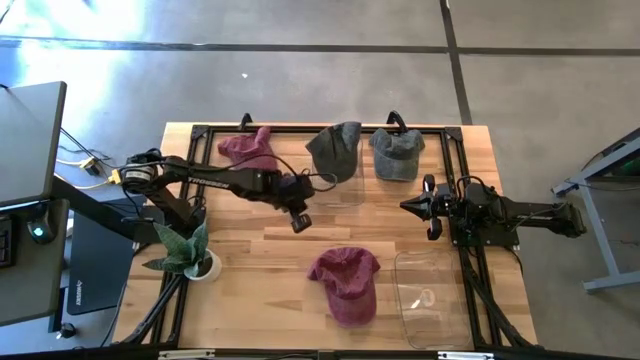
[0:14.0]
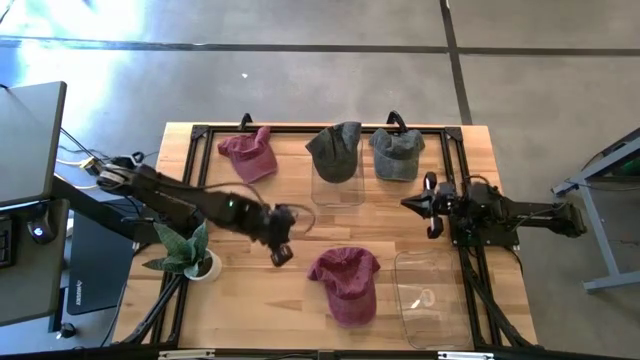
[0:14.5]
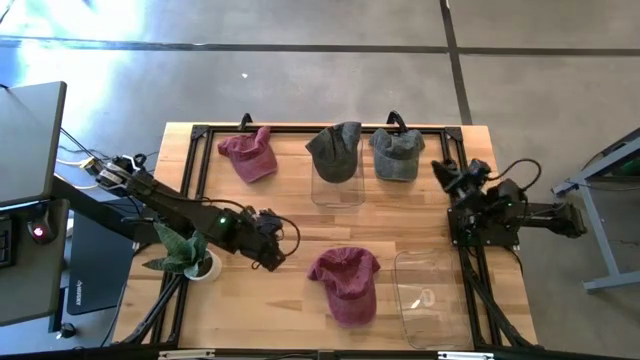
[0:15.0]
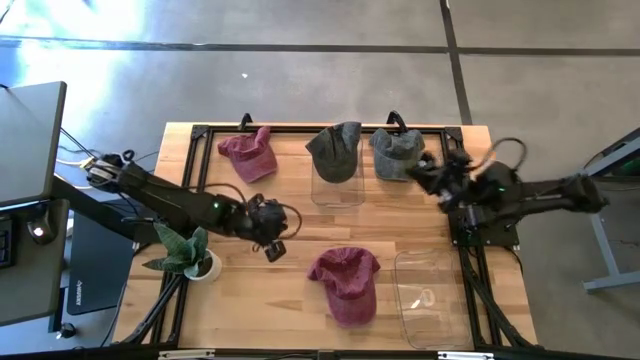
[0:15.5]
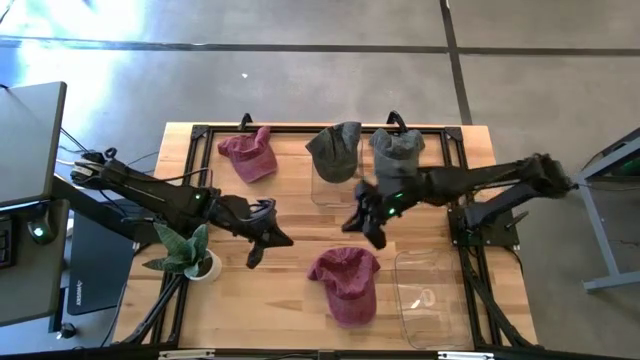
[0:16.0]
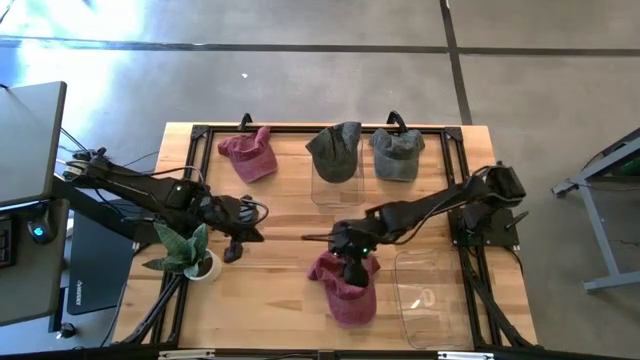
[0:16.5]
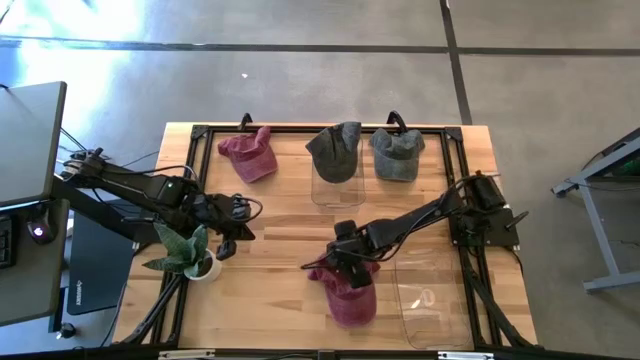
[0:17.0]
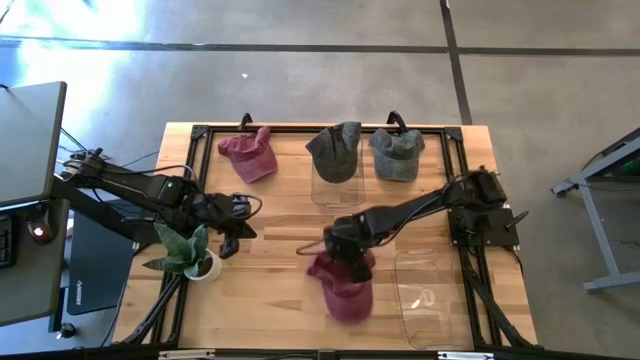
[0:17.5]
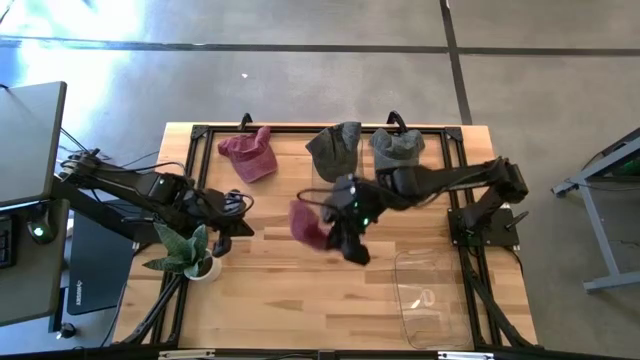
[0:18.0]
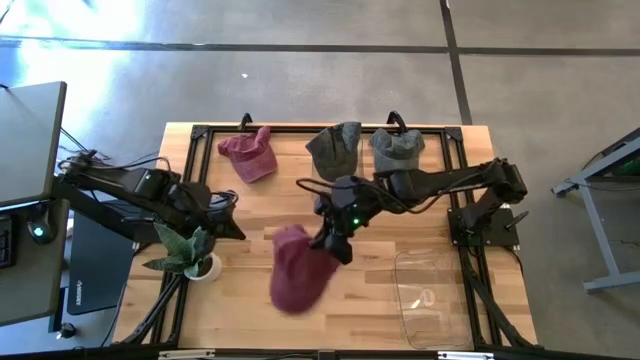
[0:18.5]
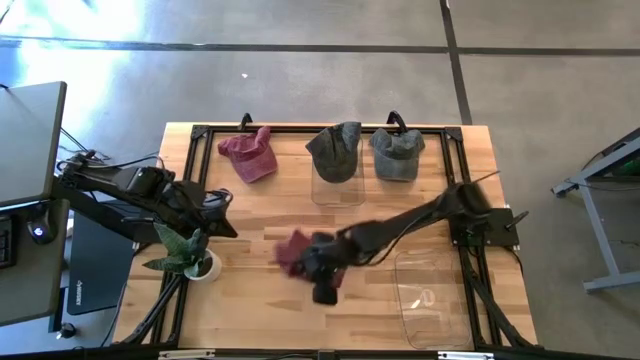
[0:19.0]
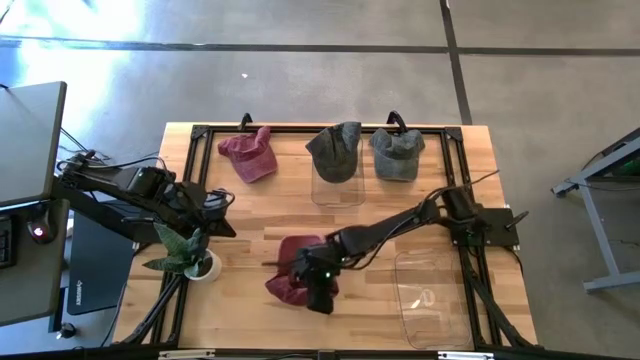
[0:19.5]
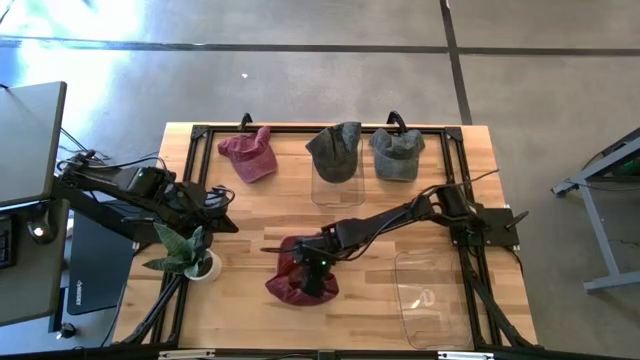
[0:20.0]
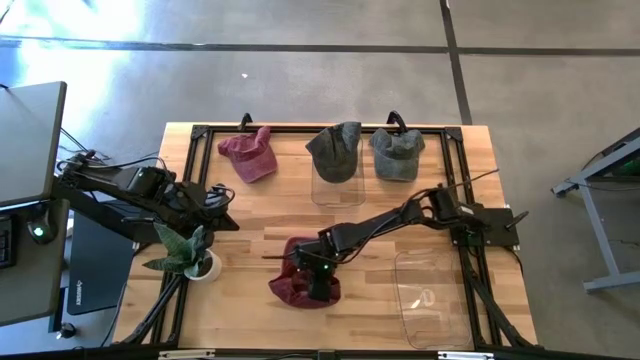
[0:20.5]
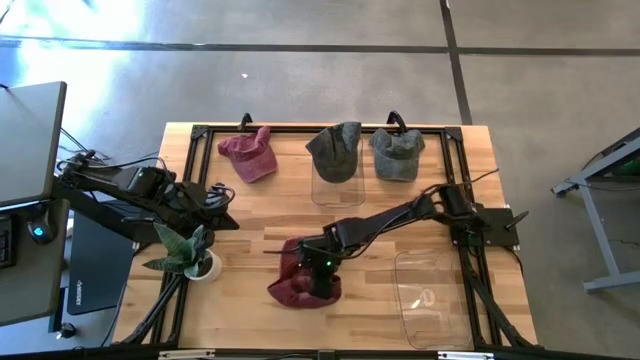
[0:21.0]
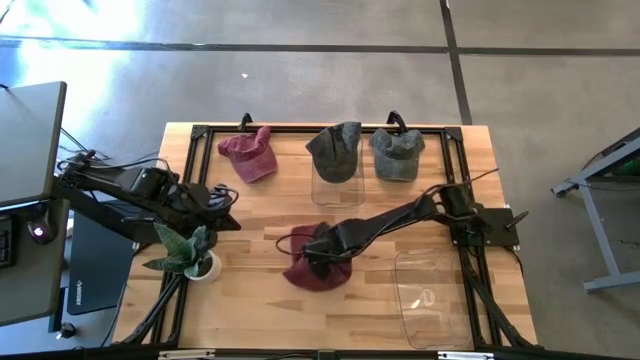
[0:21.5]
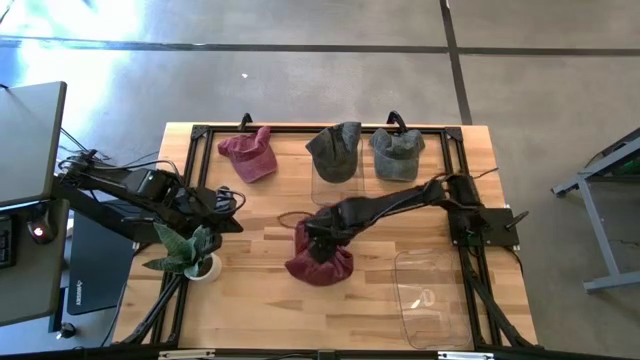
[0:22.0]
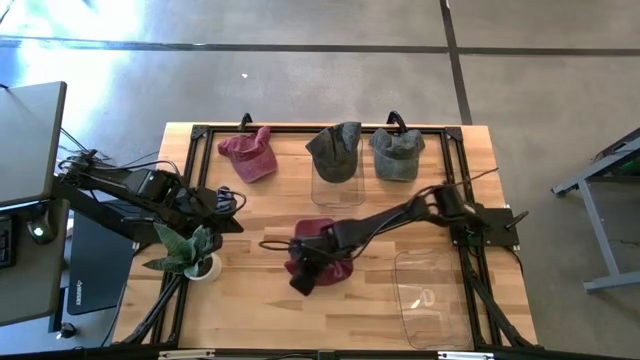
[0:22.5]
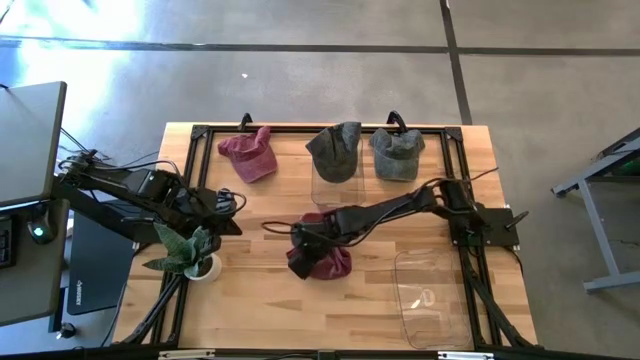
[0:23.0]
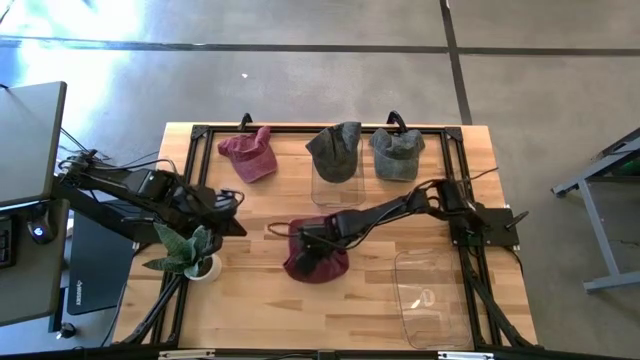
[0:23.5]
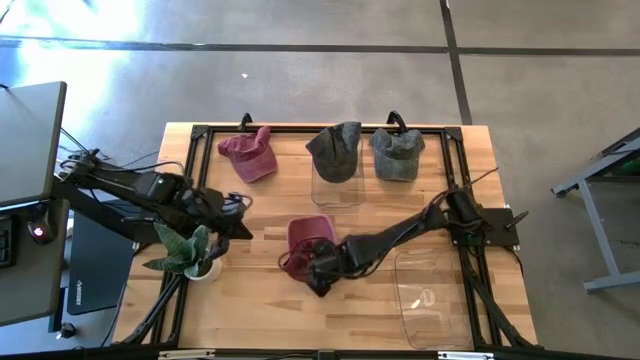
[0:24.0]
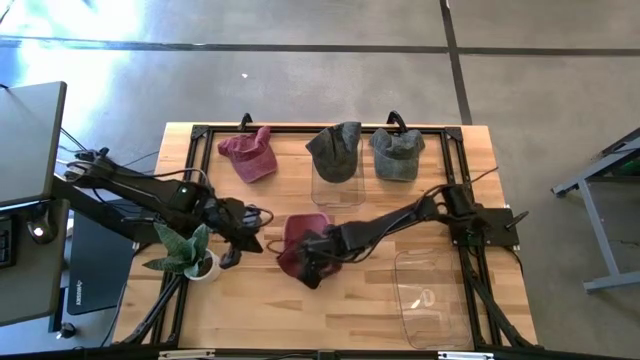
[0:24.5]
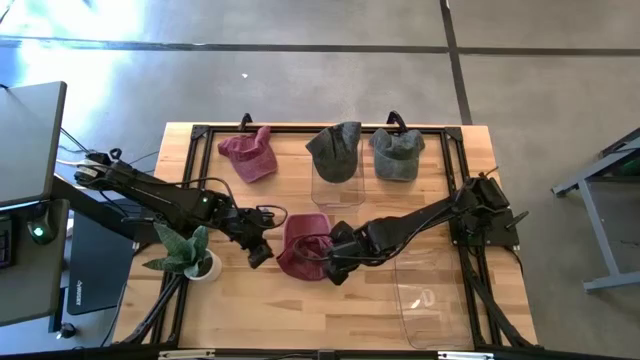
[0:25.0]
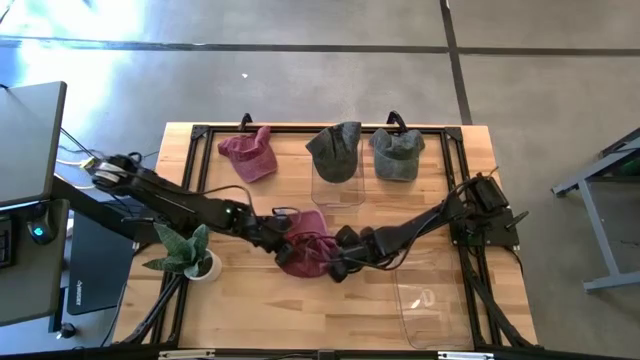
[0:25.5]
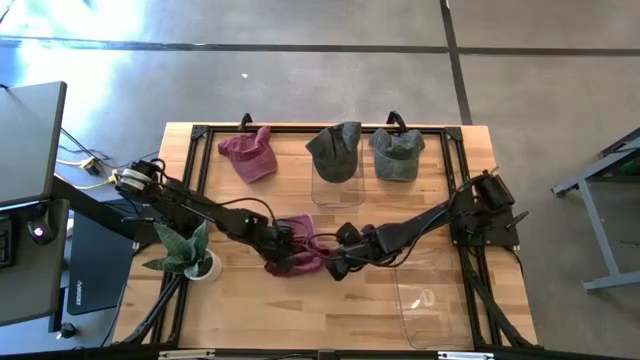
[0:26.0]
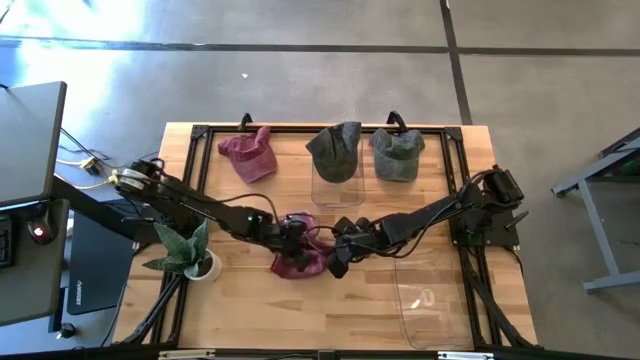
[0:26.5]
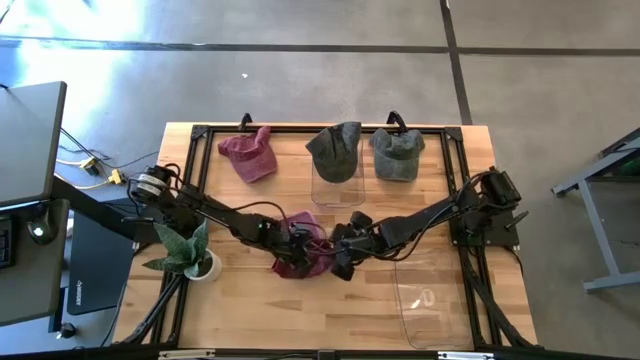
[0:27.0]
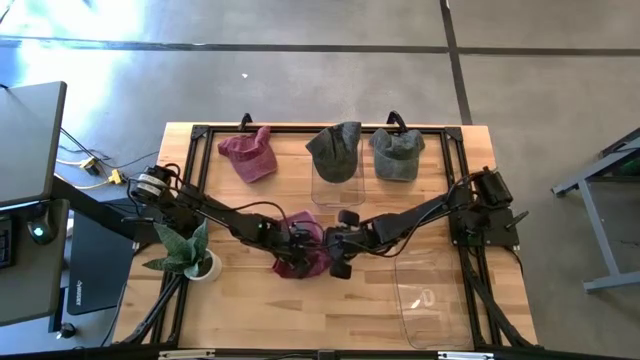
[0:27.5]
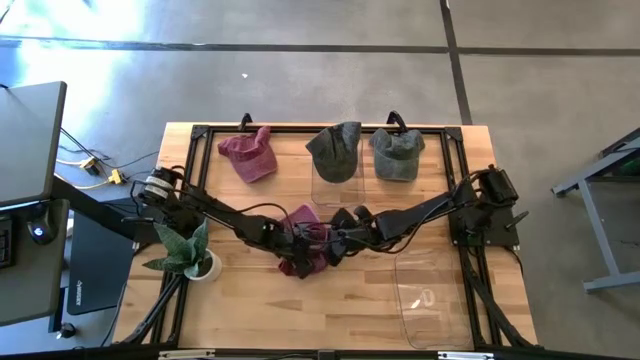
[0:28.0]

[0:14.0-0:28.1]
Task: Pick & Place hat
Put the bottom red cap into the bottom transparent bin

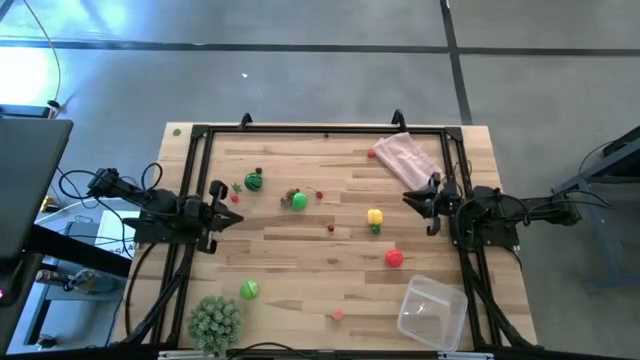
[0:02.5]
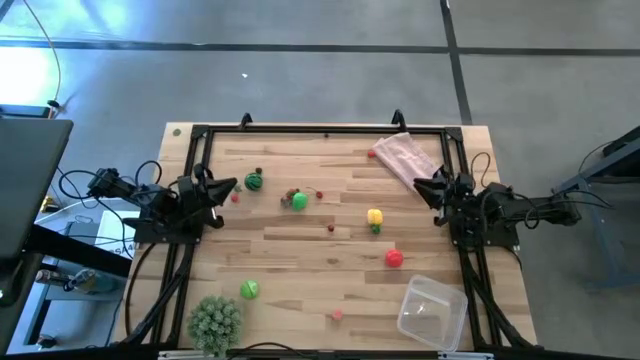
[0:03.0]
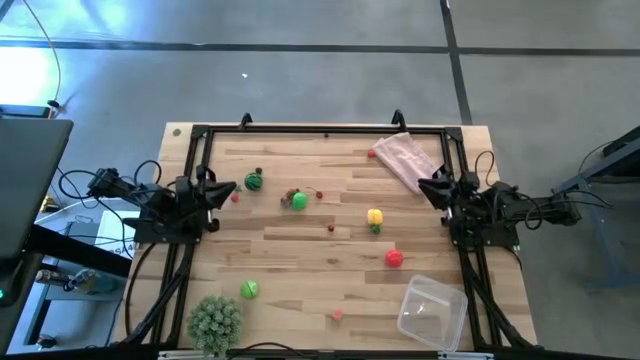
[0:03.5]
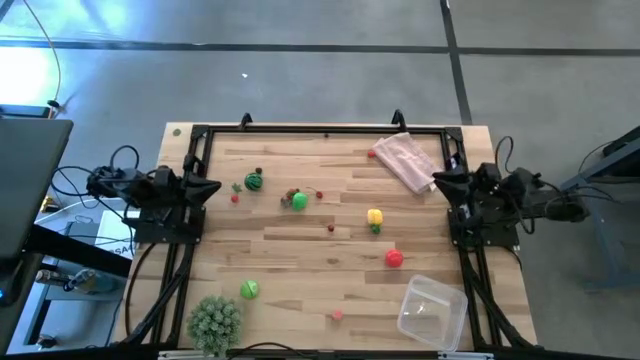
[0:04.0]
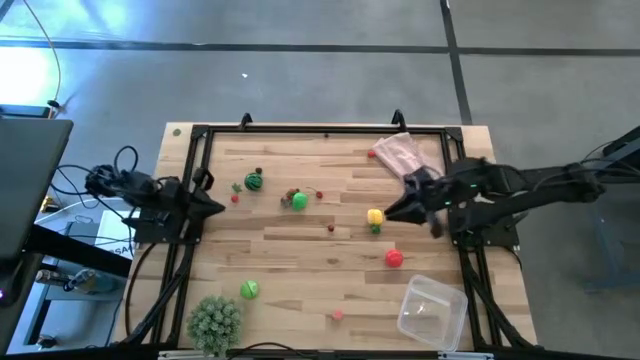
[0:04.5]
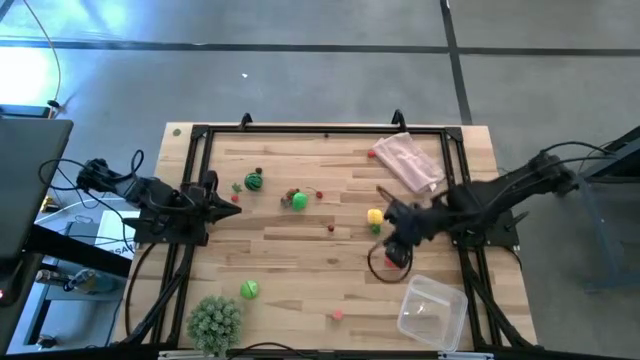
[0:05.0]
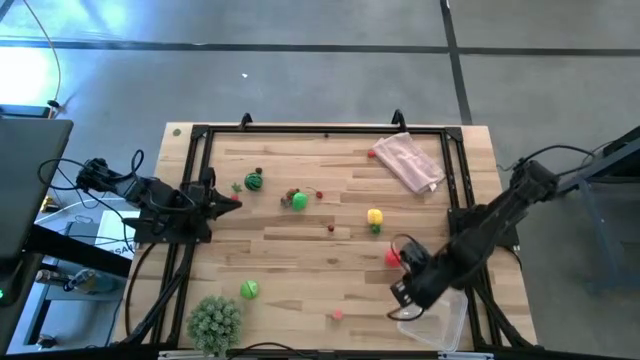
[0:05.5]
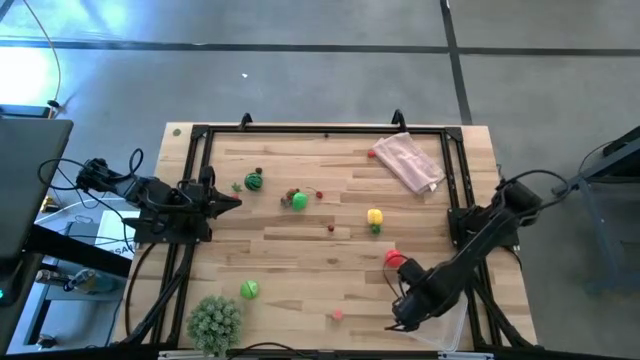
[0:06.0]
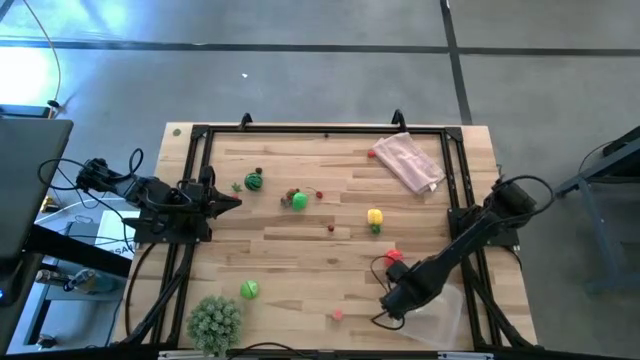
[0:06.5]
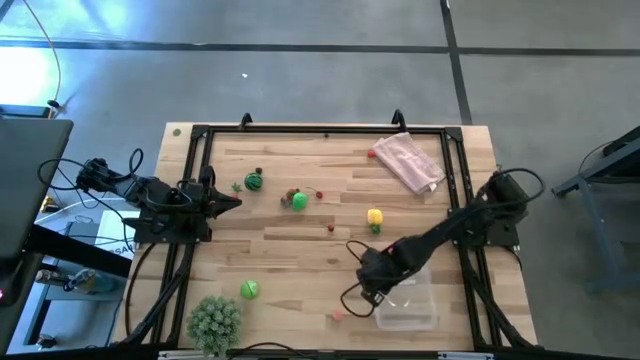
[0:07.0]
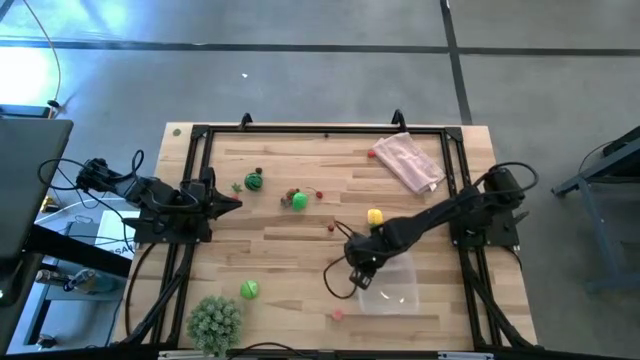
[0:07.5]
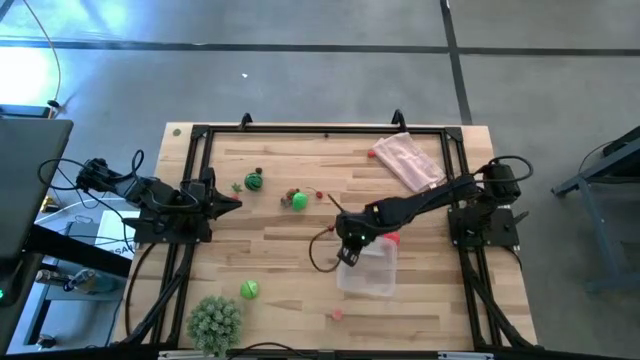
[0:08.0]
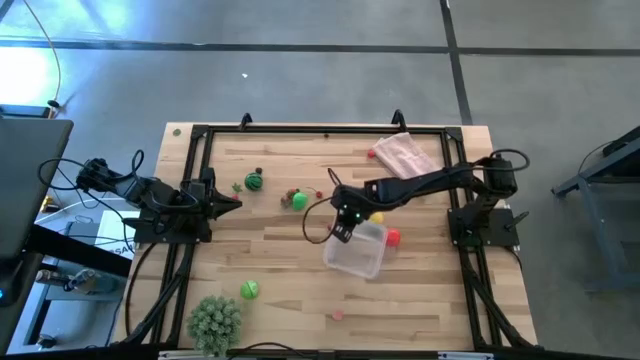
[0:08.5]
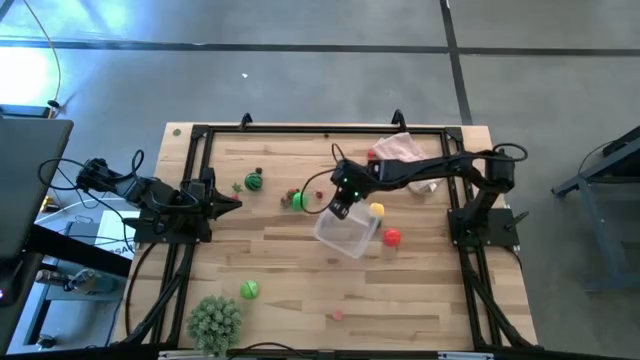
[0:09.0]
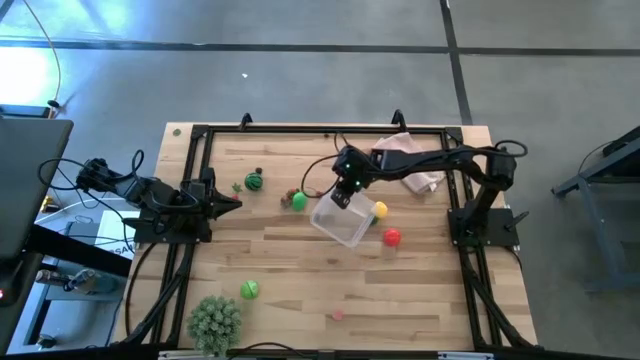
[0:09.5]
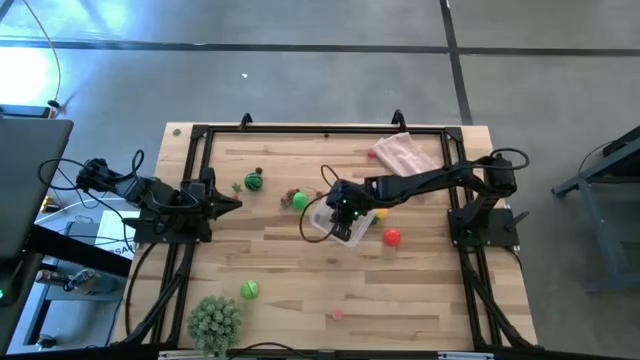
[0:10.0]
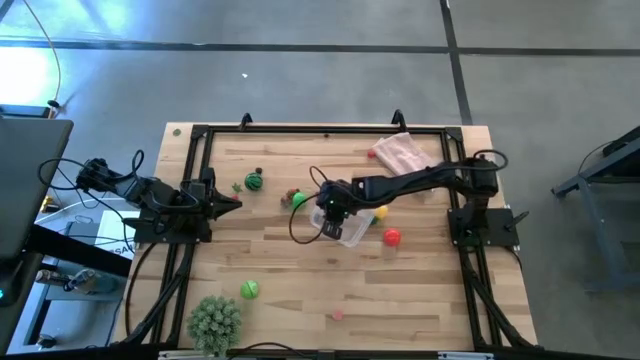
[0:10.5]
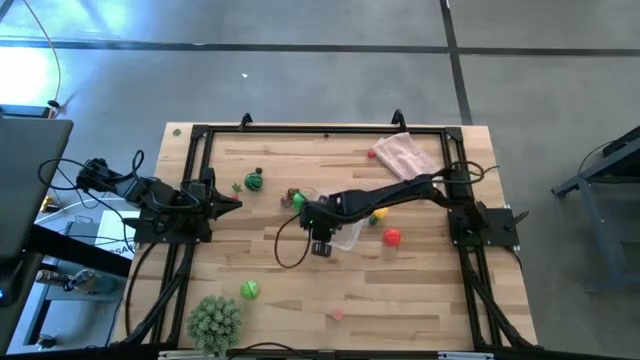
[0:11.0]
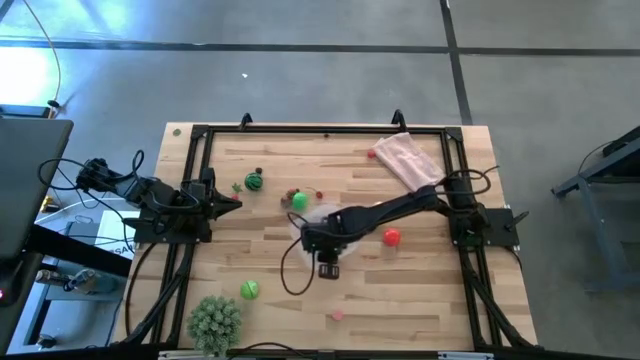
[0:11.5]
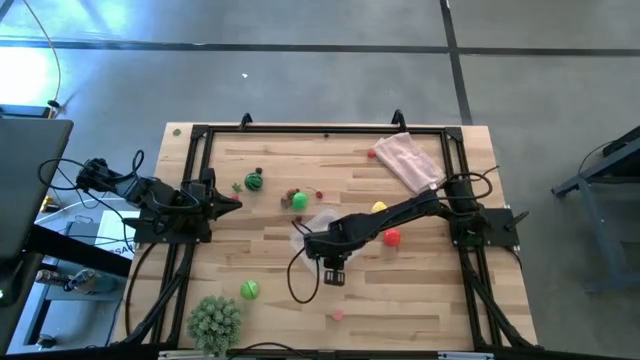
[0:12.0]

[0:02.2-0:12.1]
Task: Pick and placing Produce into tupperware
Prepare the transparent container to the center of the table
